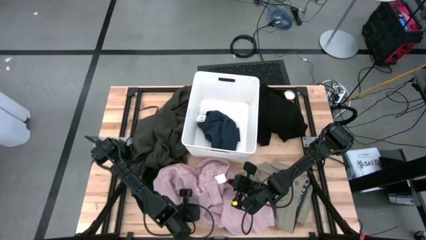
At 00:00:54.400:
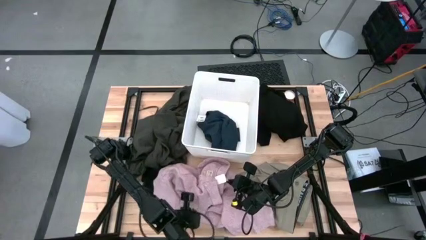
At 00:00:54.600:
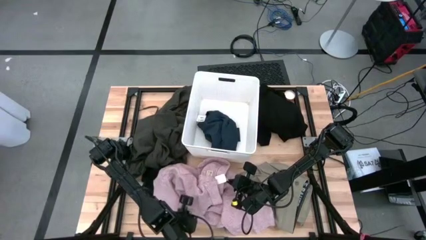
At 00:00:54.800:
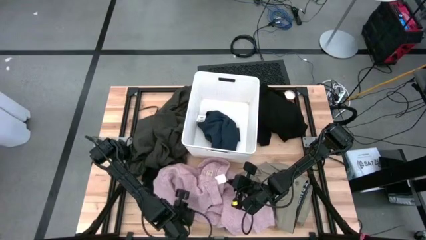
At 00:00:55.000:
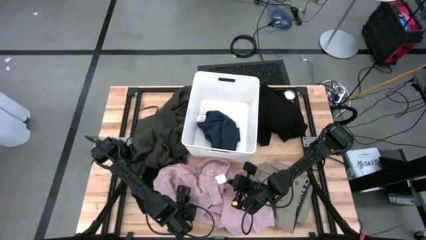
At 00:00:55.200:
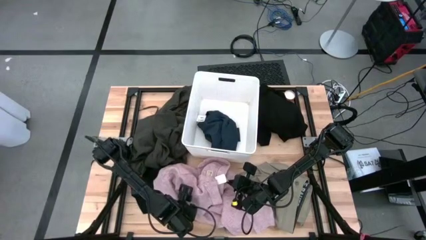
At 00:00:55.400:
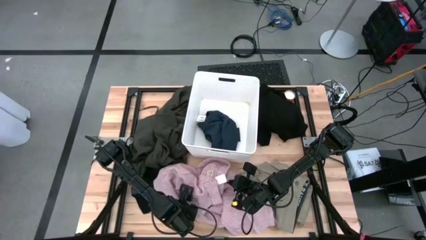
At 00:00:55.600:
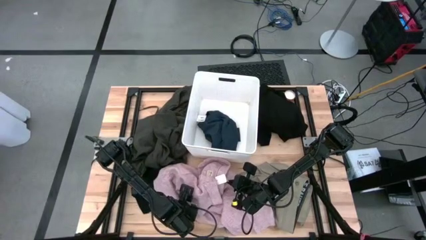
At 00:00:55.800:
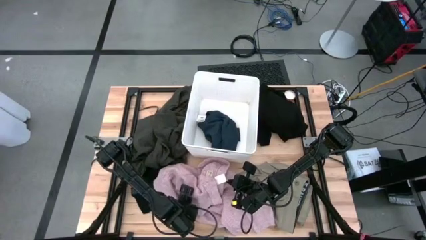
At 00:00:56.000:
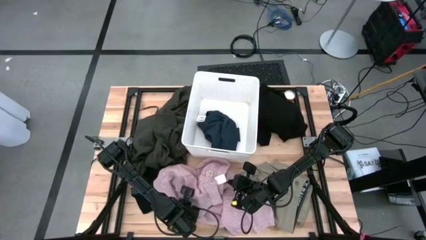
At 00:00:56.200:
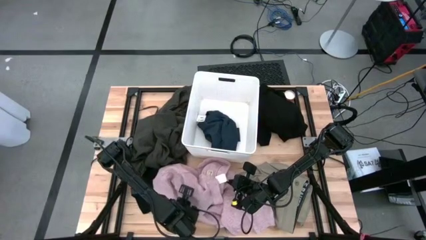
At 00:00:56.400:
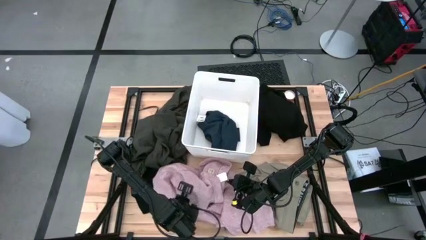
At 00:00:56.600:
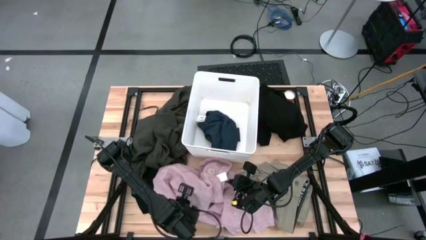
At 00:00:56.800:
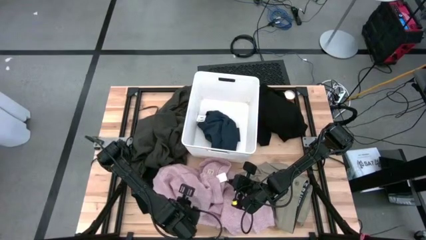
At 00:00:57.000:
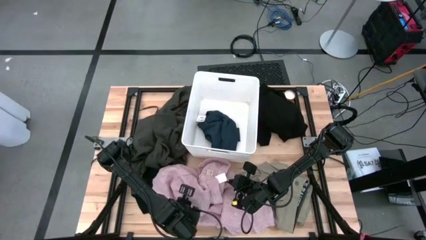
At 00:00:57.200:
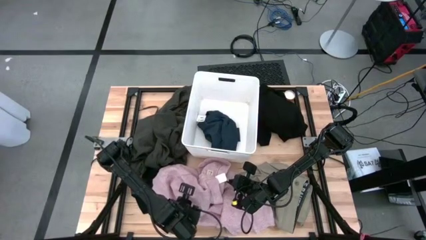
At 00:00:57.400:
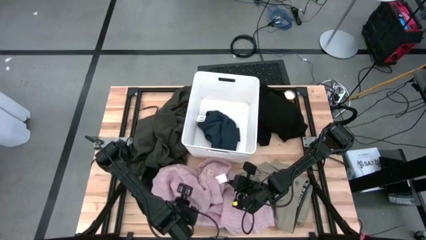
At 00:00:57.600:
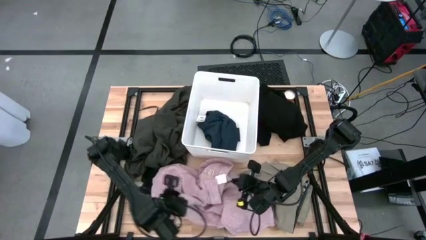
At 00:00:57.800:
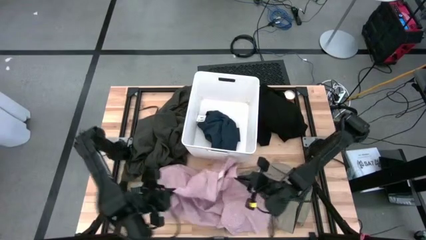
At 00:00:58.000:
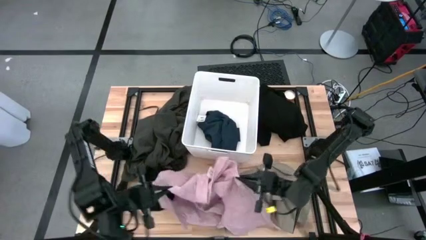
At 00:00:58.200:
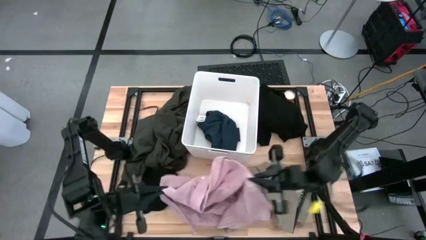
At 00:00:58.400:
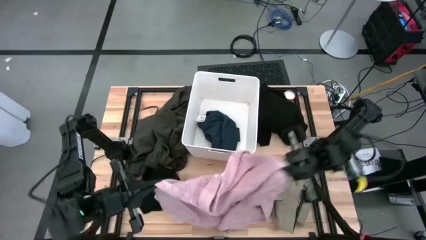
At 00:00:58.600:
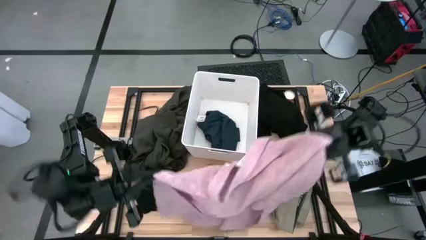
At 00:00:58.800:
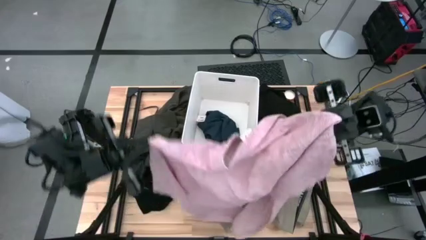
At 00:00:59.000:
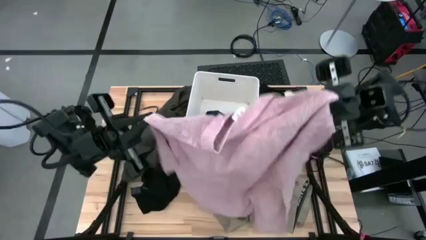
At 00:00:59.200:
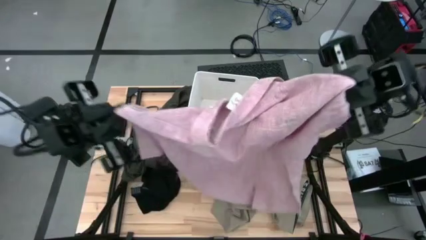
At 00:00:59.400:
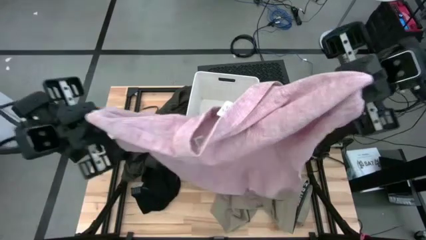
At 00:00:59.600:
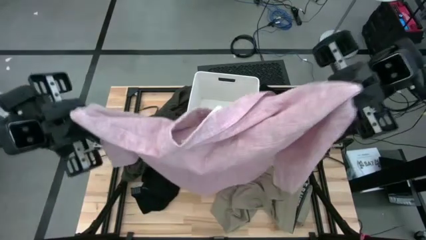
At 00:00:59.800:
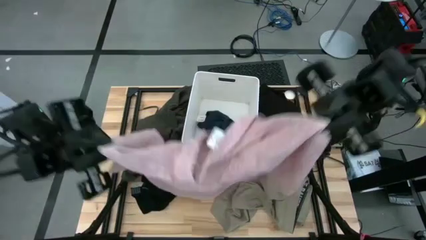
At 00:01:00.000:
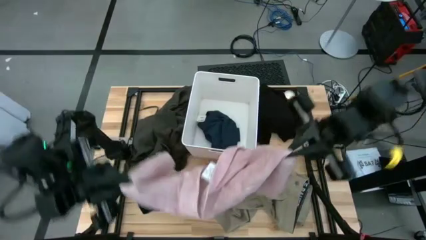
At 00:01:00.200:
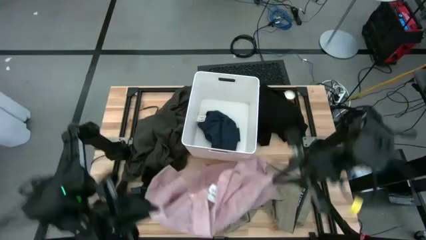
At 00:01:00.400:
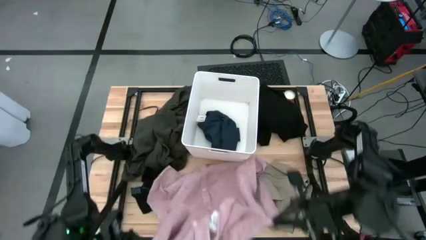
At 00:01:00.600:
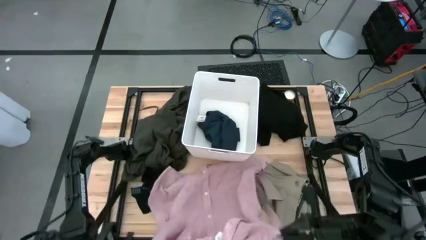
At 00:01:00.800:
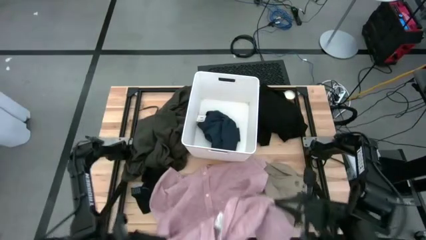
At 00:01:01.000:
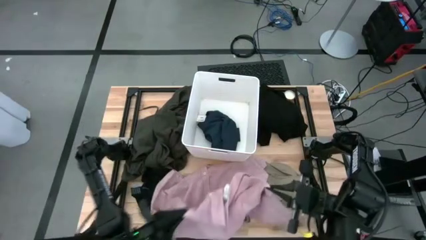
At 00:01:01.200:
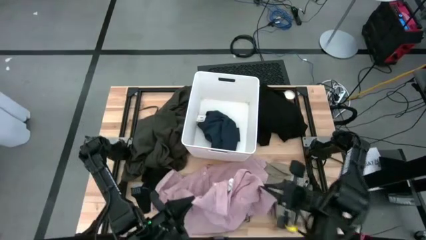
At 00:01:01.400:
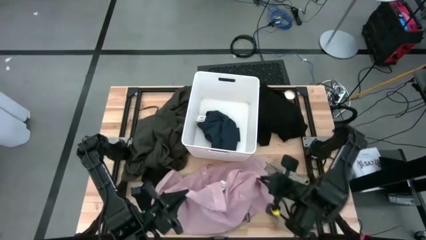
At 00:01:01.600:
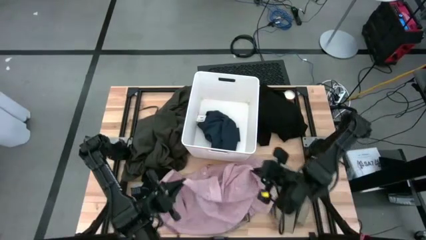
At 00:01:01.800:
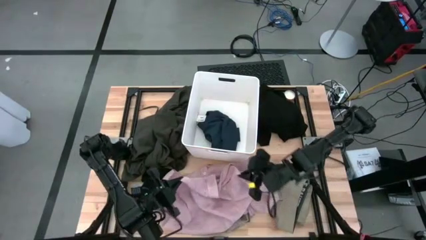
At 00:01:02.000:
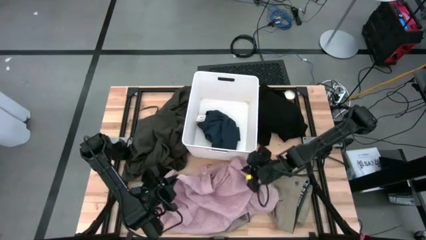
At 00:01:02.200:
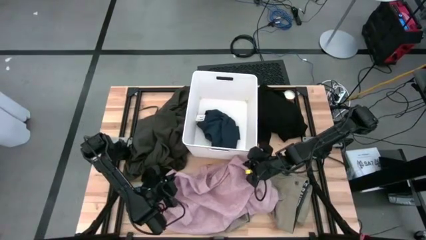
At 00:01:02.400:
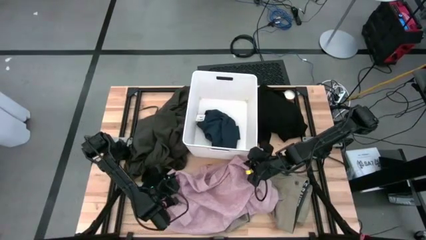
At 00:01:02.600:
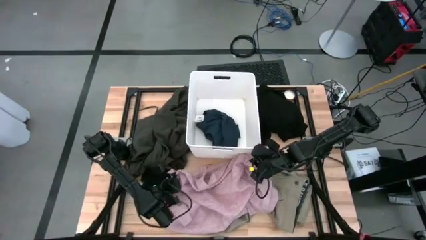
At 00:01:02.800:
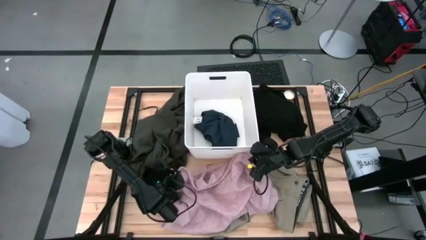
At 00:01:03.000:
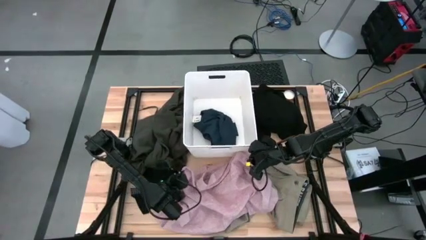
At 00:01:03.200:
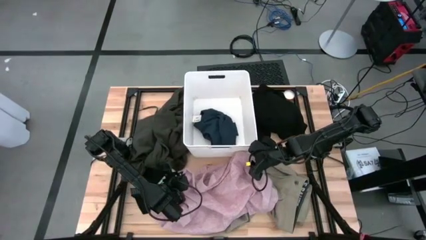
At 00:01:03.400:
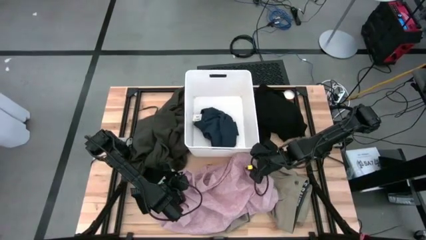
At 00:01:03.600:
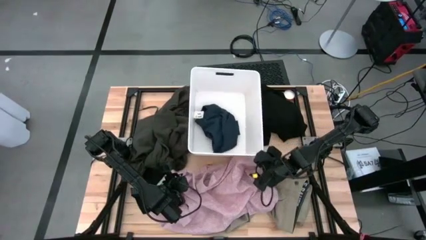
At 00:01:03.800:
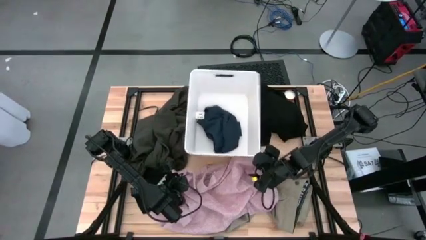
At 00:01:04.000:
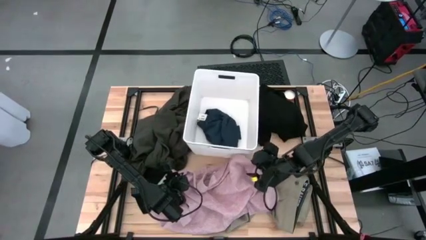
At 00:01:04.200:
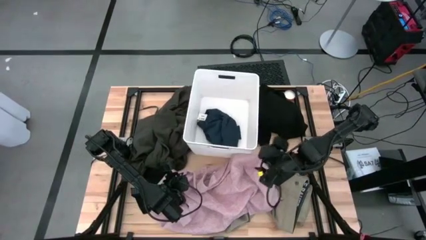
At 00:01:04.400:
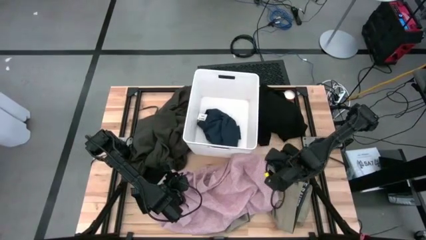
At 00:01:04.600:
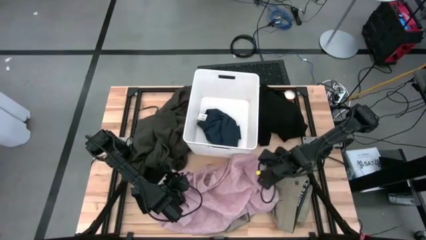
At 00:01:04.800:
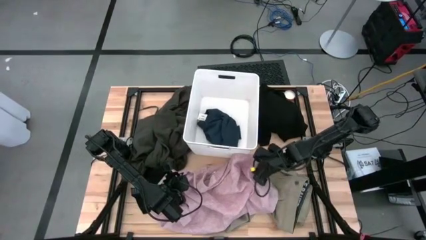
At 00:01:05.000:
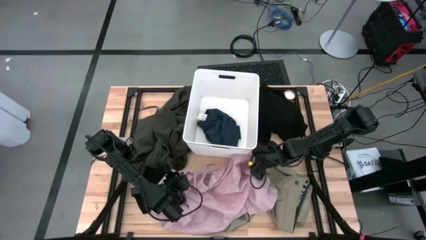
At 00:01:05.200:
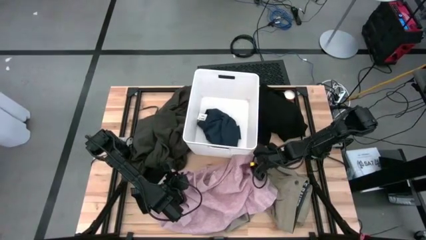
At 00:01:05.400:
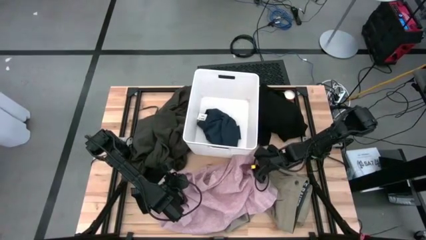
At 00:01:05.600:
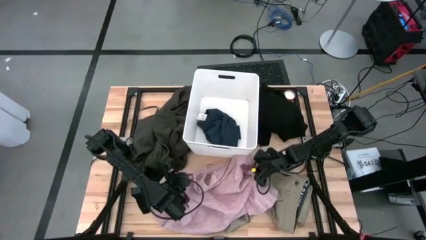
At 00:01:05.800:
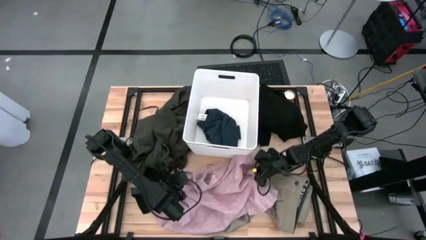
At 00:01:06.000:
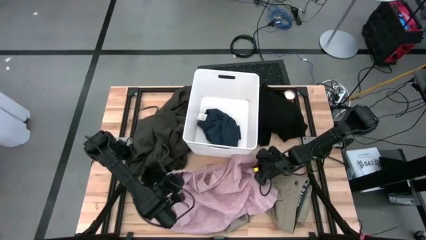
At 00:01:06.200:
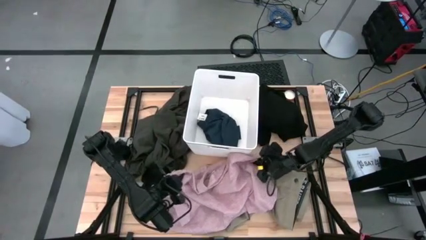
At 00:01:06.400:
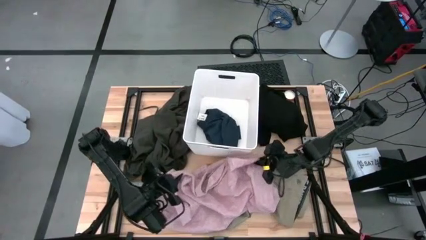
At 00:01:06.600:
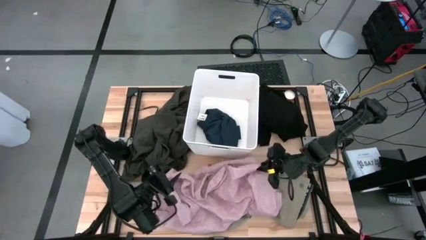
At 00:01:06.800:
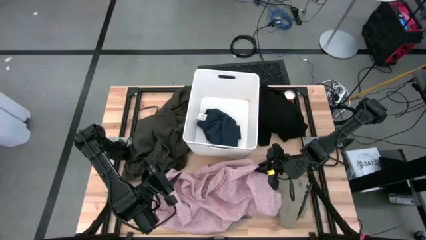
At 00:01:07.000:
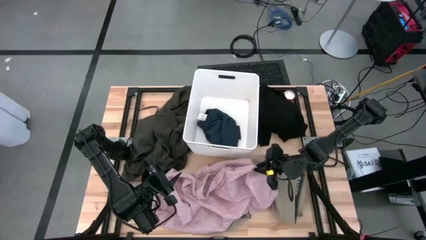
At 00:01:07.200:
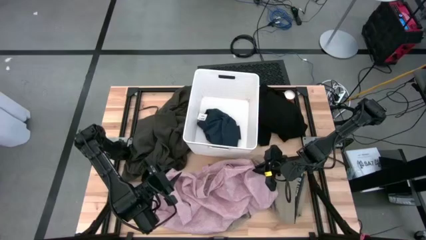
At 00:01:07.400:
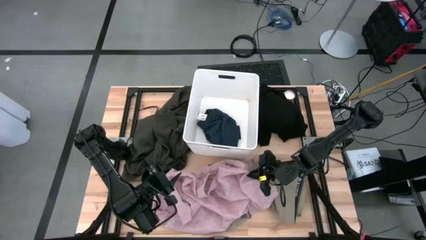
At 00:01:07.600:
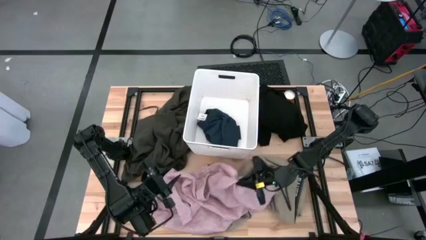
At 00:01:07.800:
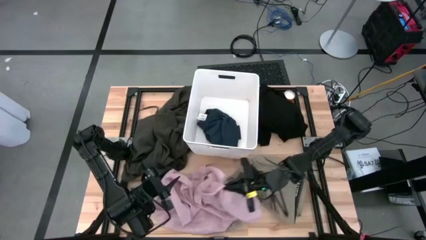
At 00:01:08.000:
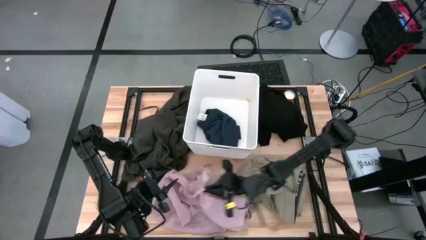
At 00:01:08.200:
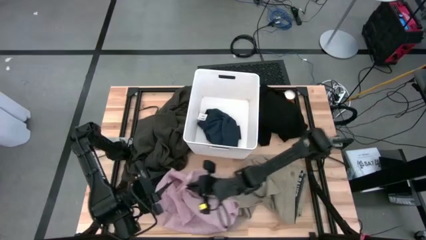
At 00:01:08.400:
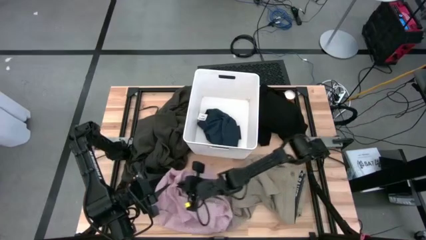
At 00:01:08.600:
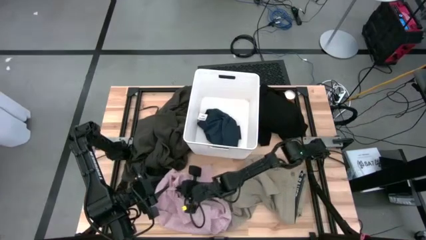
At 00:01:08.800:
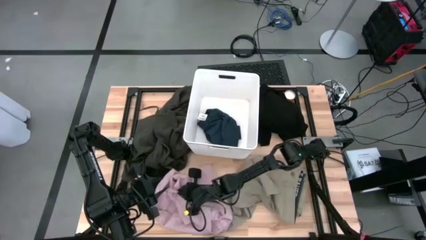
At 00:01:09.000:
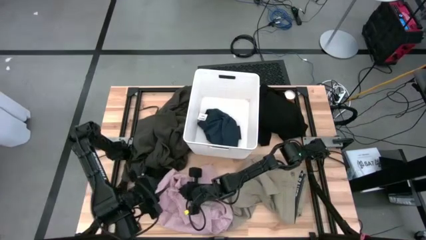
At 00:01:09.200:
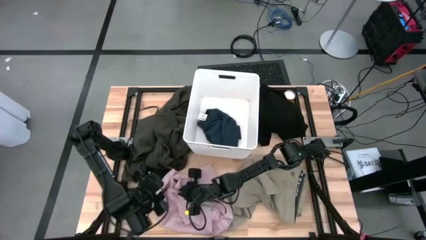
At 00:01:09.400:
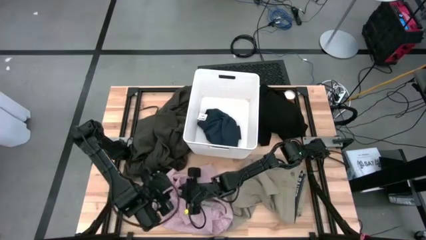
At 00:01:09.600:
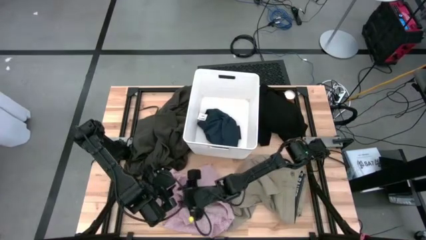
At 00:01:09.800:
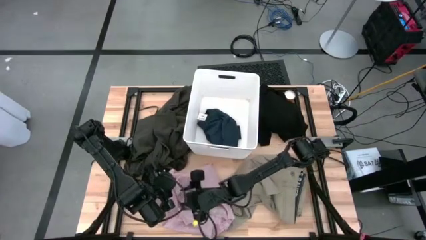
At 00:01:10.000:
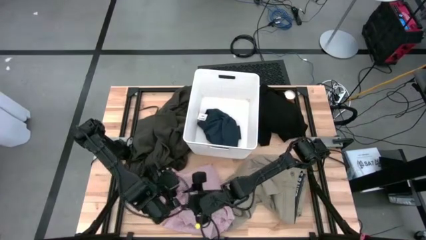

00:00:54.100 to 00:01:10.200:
Task: Sort clothes
Put the pink shirt into the white laundry bin
